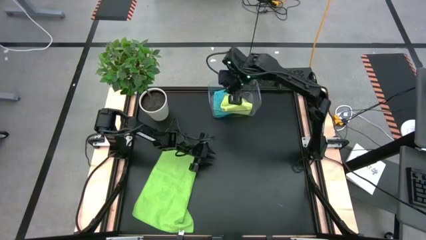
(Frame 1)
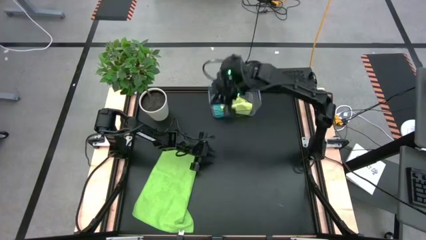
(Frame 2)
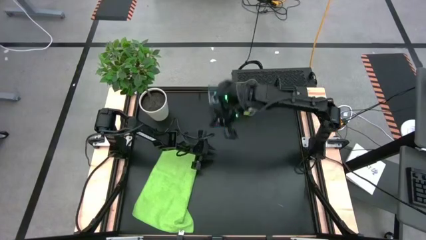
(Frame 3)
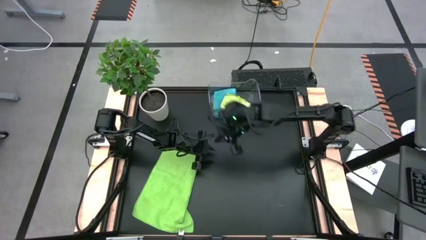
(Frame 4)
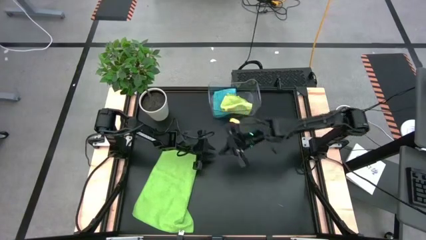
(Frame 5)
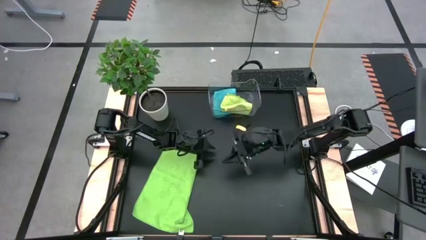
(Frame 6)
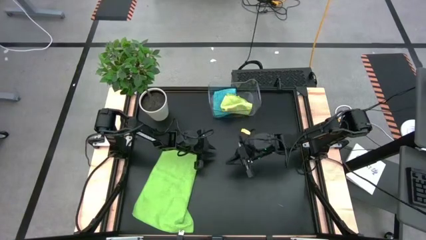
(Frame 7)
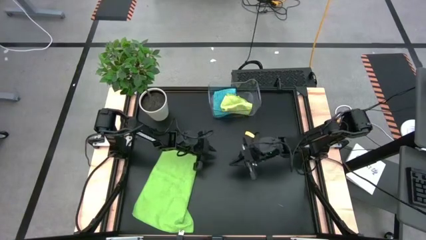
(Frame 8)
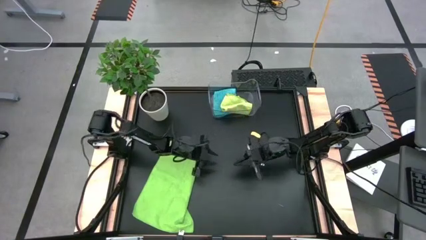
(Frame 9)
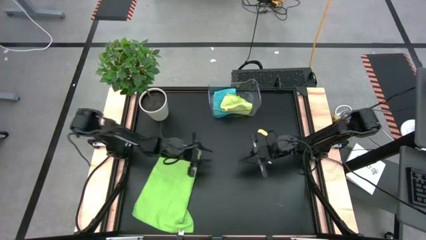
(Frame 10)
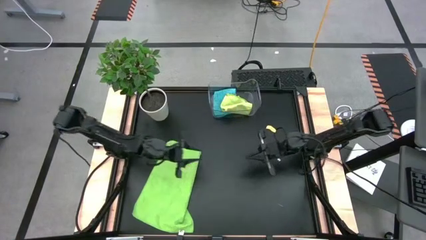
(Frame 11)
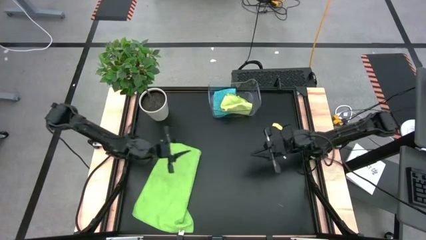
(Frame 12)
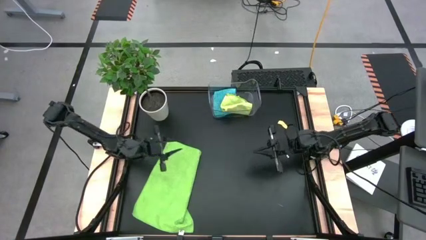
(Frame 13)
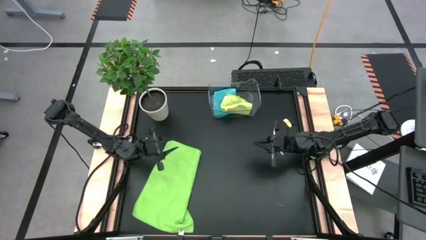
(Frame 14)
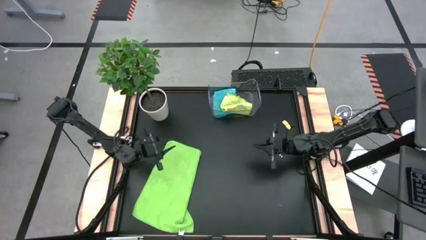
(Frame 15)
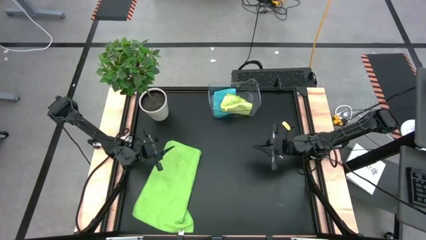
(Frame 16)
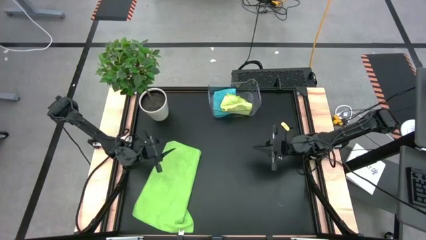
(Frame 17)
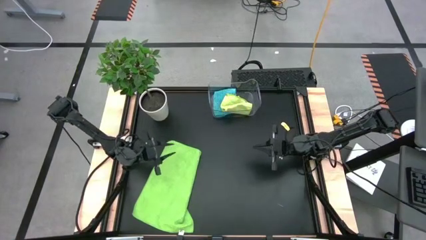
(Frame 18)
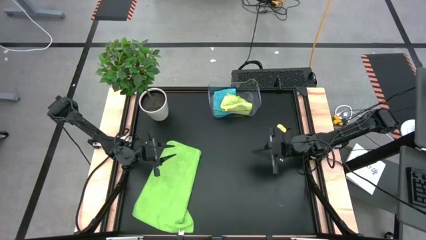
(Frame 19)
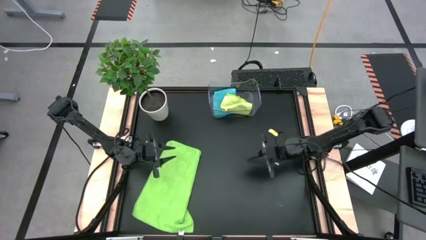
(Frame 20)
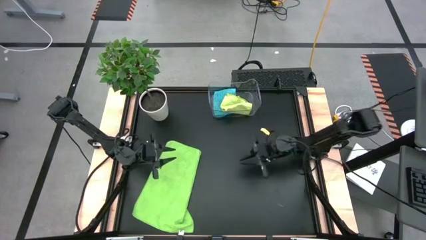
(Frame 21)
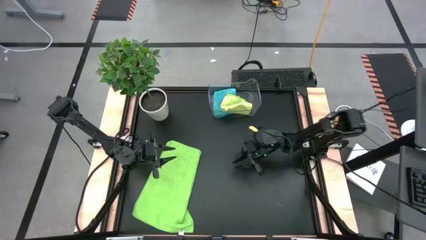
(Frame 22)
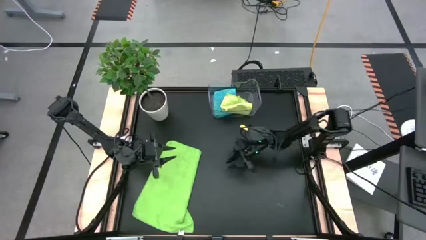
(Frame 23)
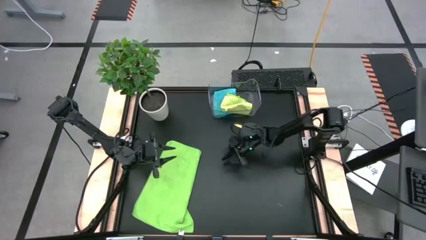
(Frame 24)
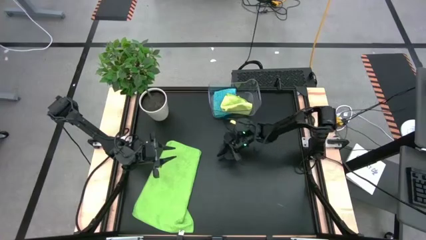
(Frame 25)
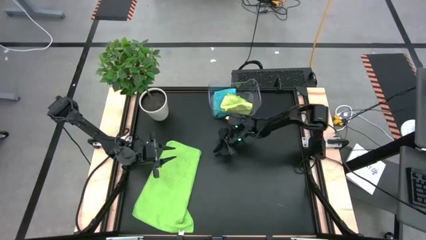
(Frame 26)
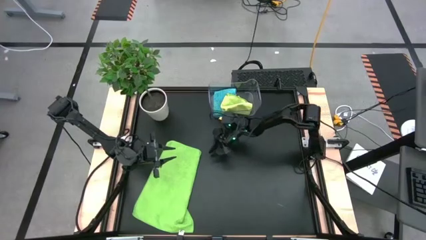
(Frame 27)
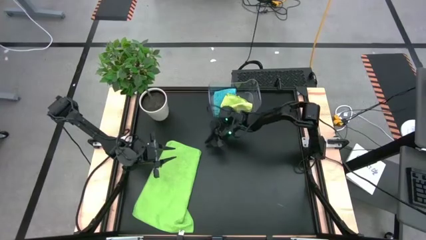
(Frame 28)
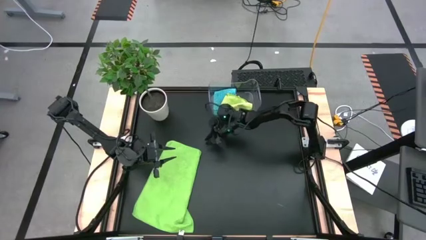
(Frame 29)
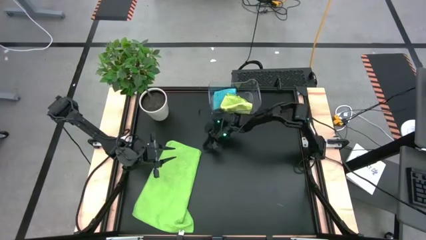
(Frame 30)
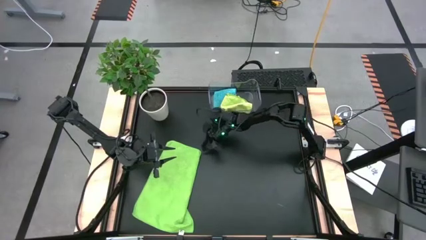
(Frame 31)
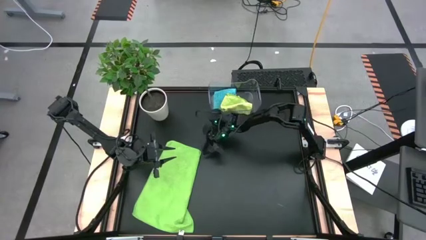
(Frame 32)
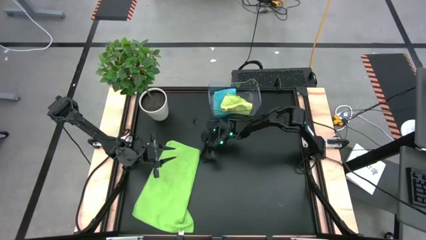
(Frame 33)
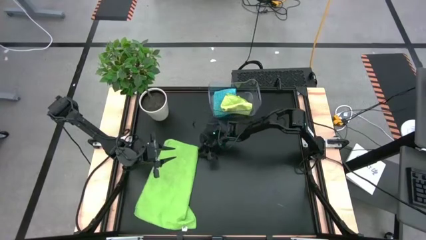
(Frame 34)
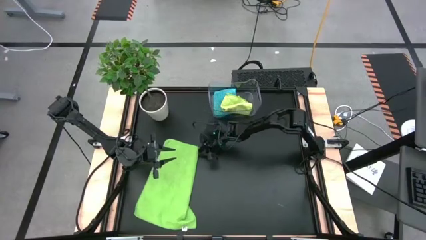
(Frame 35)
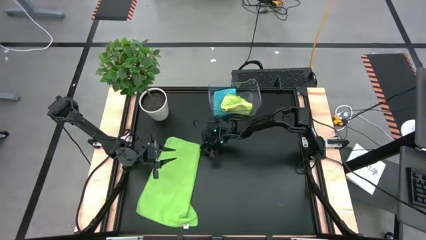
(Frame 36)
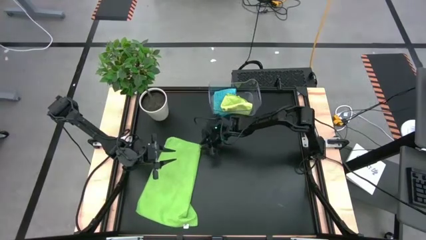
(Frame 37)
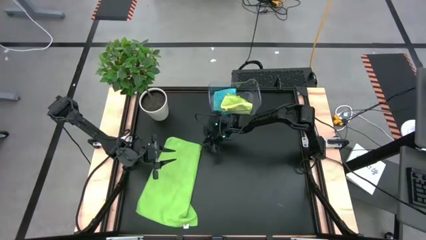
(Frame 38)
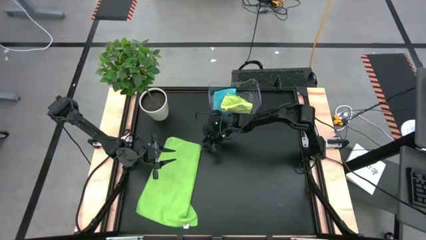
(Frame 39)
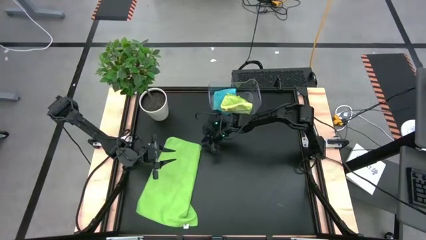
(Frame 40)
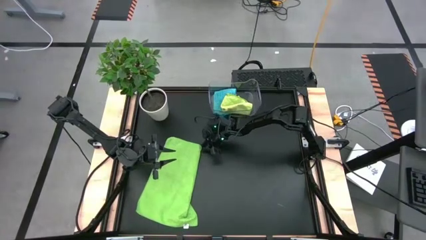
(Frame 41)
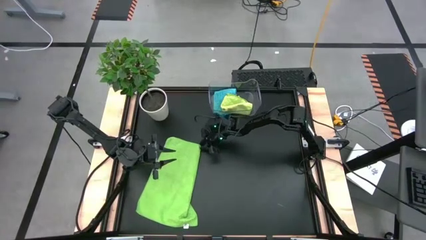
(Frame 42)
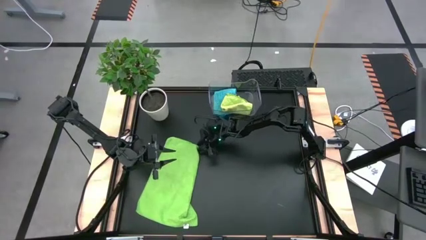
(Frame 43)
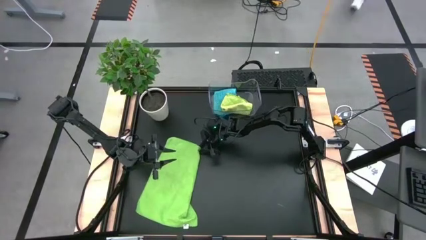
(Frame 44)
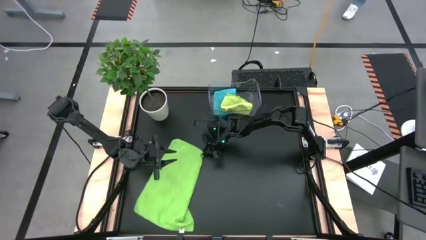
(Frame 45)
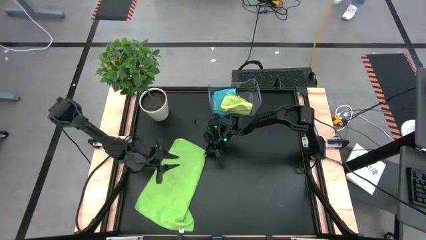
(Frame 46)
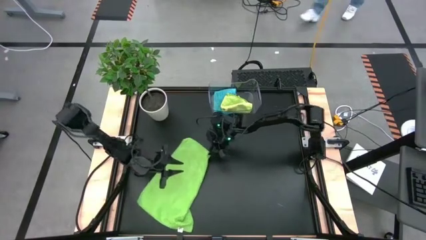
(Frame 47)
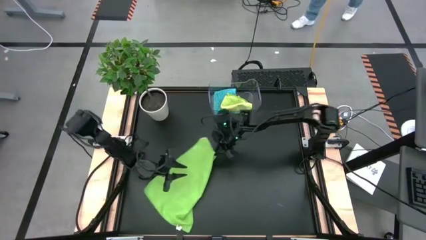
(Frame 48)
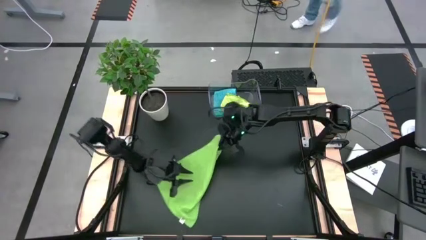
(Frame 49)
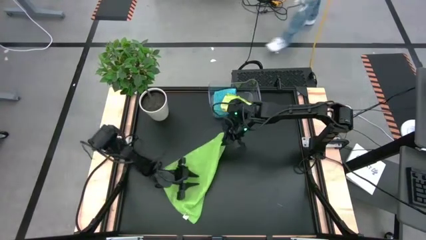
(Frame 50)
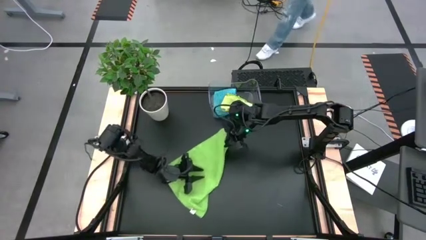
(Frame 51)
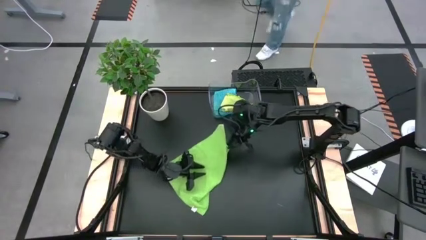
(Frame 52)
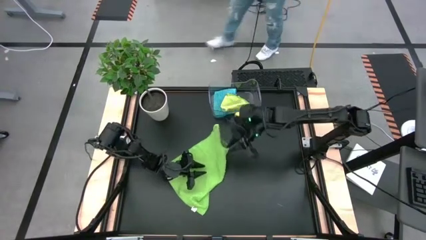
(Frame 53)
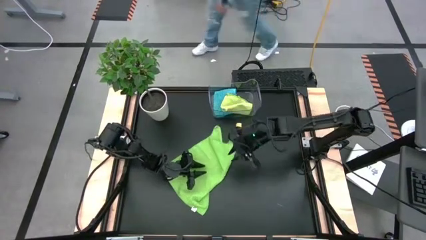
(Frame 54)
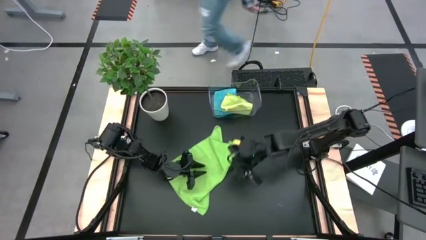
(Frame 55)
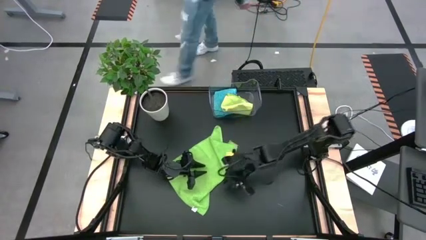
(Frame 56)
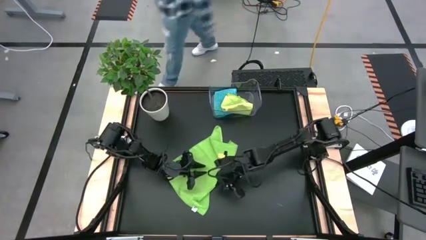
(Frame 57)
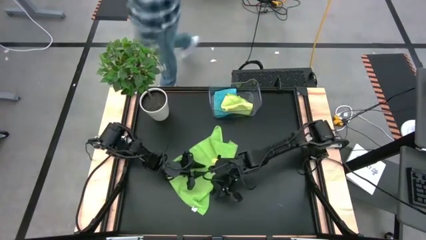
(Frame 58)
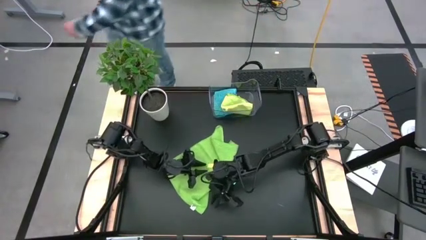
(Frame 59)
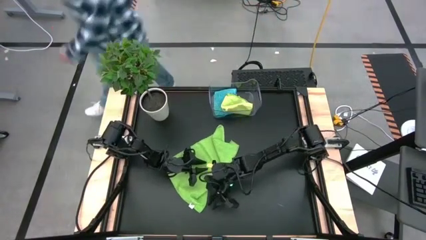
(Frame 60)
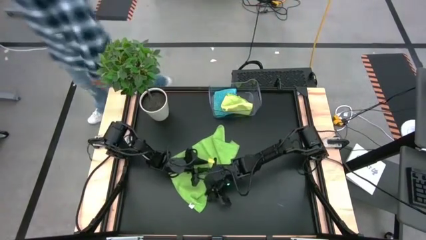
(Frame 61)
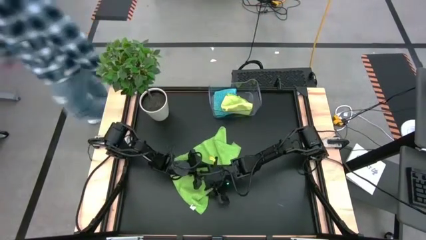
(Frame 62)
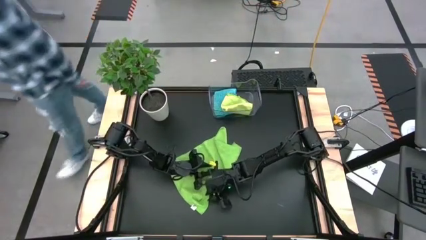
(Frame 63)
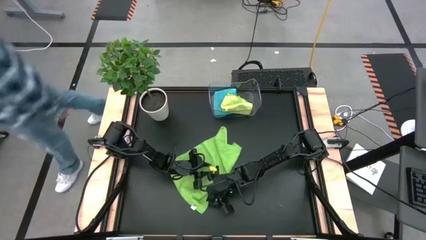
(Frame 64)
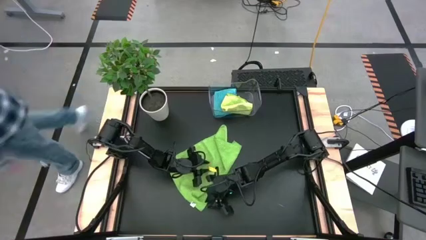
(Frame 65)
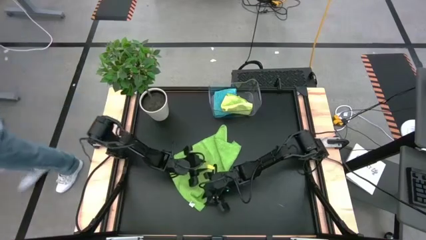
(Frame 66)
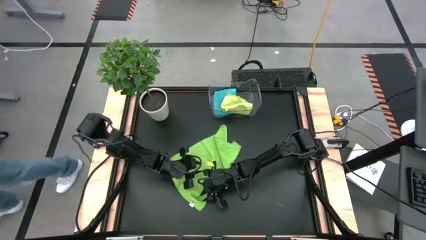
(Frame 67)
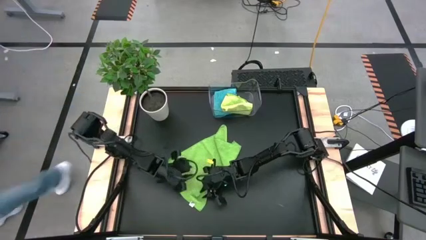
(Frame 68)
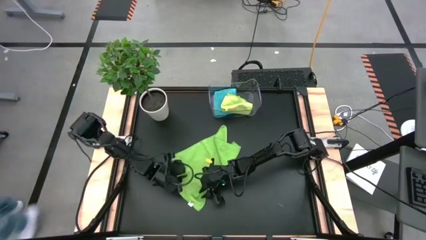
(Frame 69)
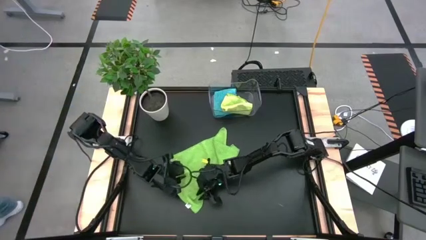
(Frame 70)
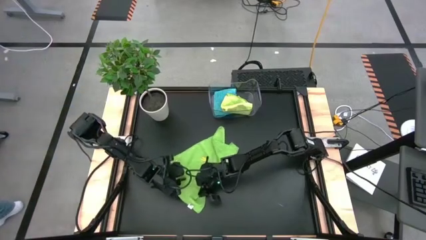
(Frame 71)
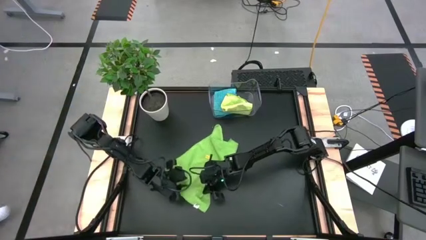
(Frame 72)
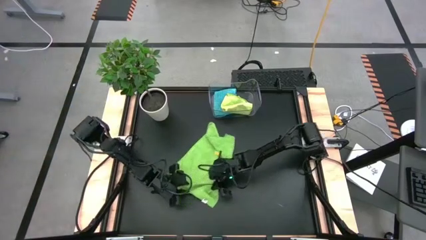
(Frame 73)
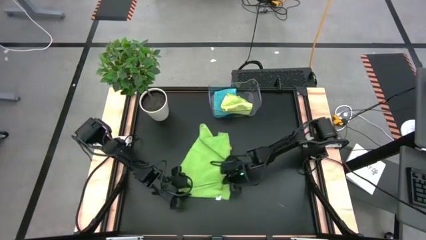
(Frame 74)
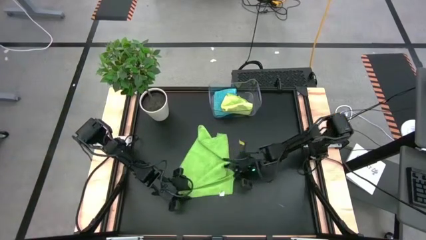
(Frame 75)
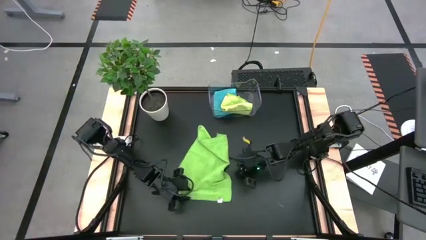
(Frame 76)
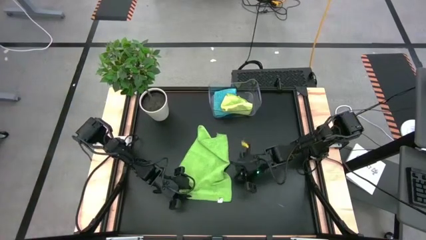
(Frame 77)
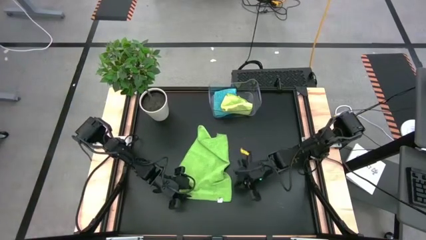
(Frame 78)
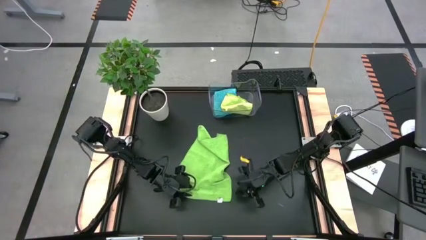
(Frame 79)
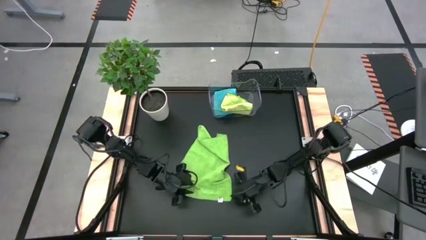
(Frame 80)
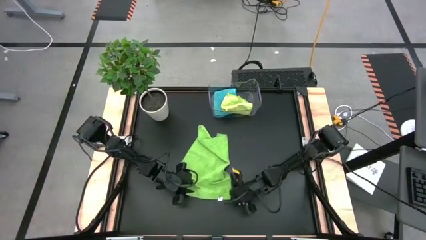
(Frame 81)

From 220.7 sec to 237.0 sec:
Task: Fold microfiber towels
Fold the green microfiber cloth
